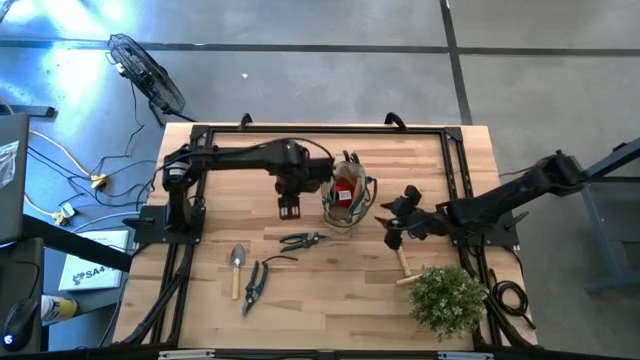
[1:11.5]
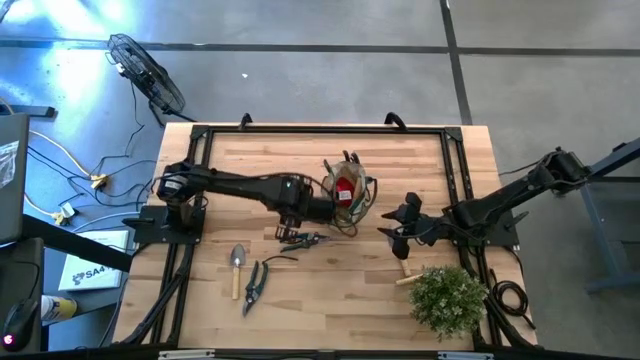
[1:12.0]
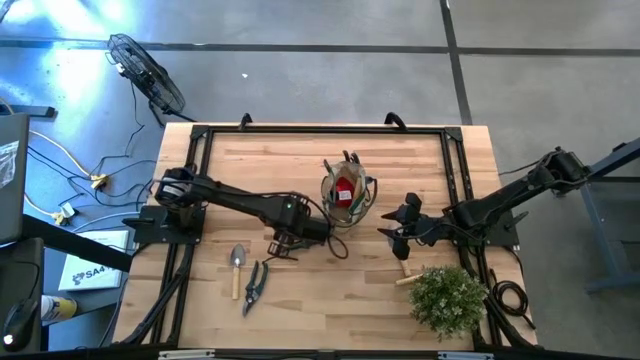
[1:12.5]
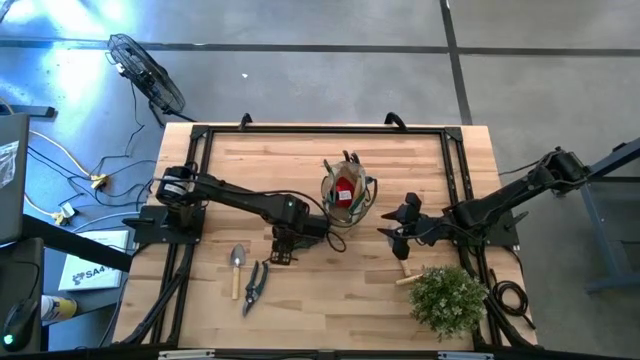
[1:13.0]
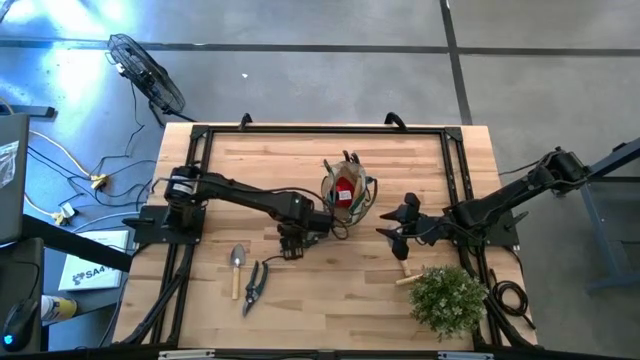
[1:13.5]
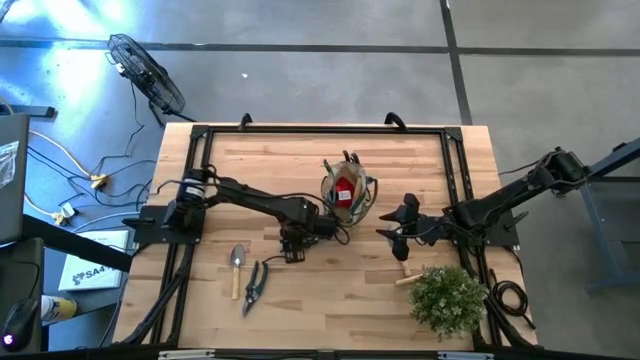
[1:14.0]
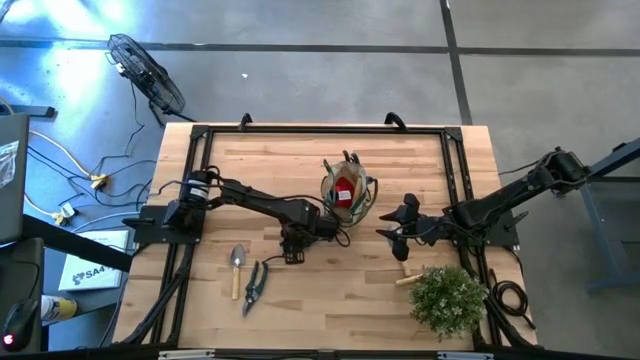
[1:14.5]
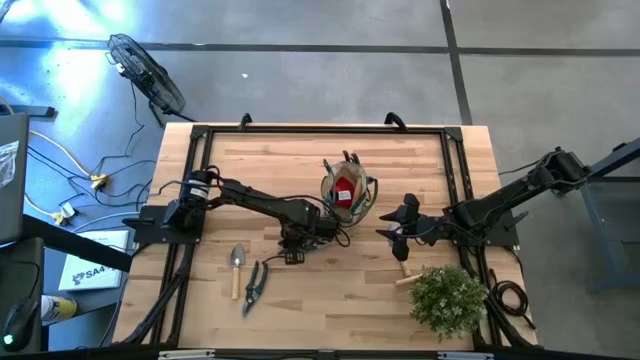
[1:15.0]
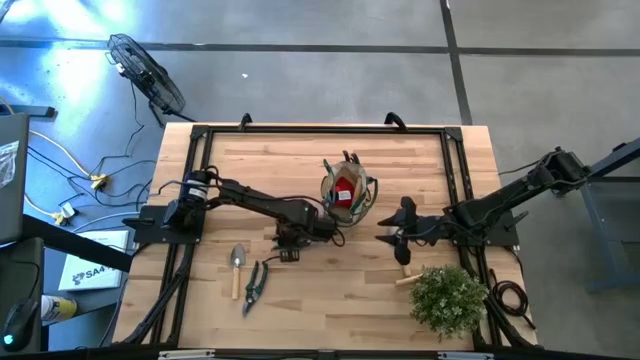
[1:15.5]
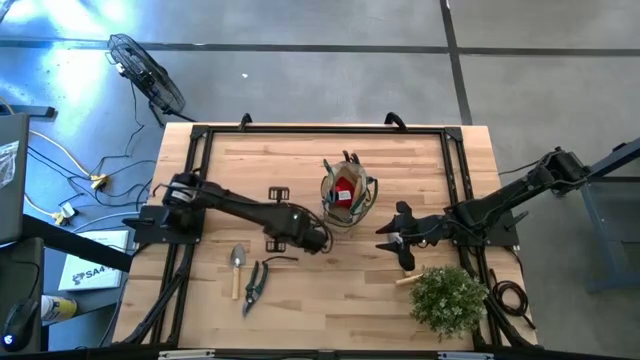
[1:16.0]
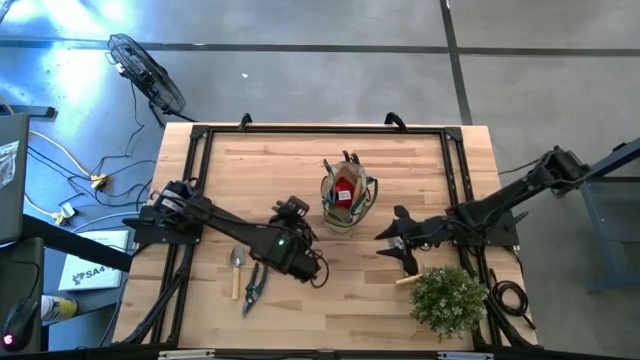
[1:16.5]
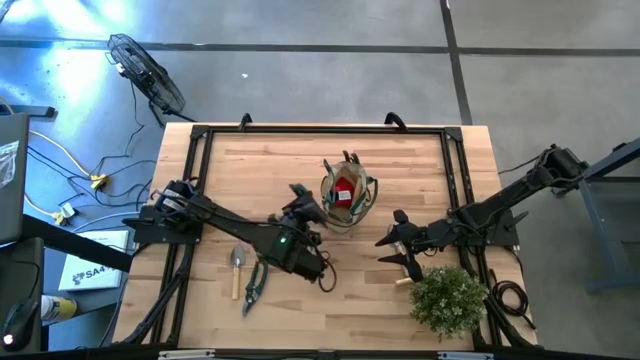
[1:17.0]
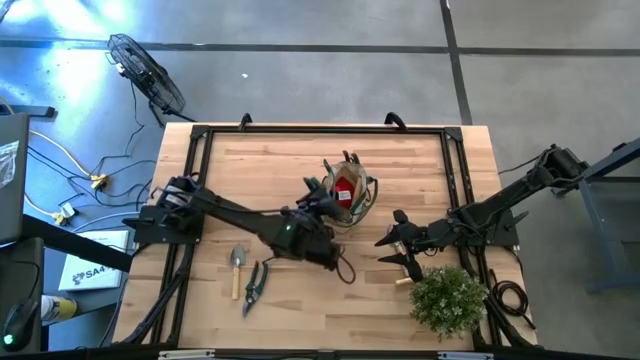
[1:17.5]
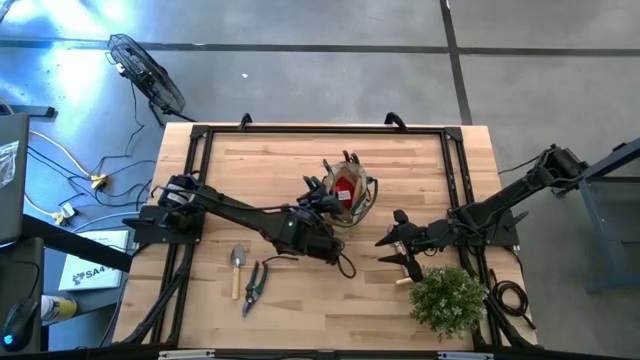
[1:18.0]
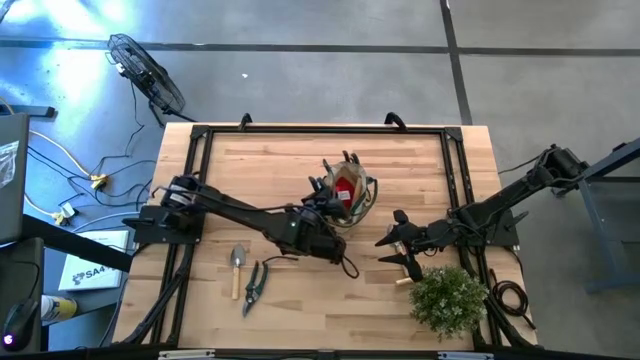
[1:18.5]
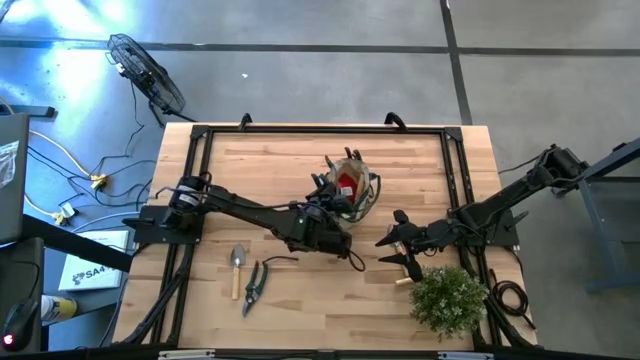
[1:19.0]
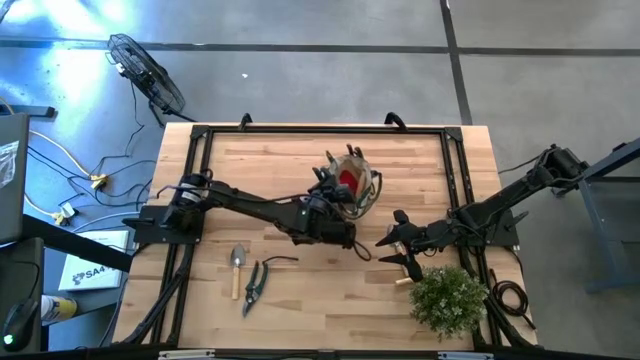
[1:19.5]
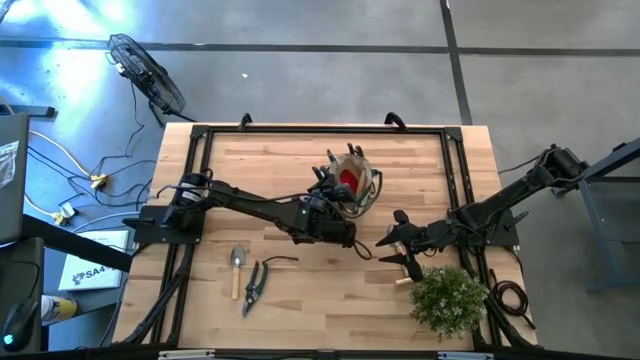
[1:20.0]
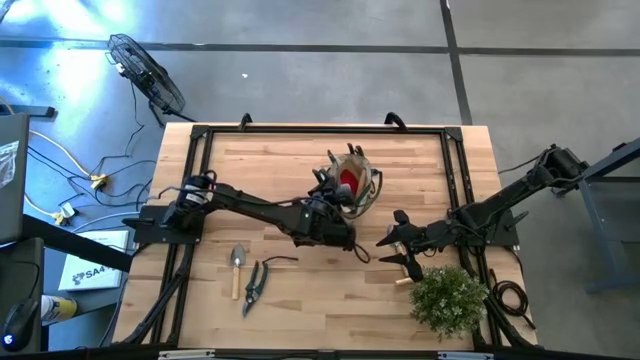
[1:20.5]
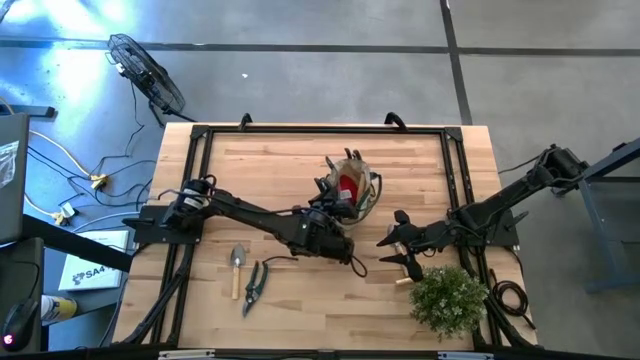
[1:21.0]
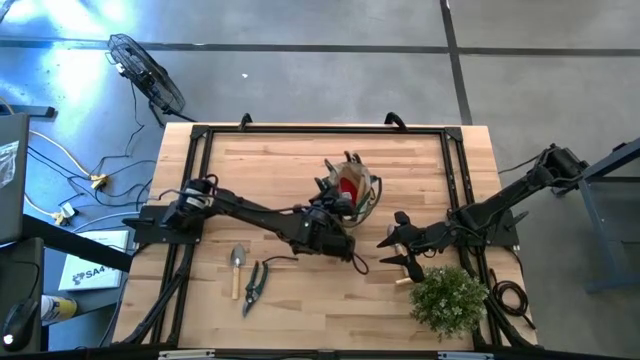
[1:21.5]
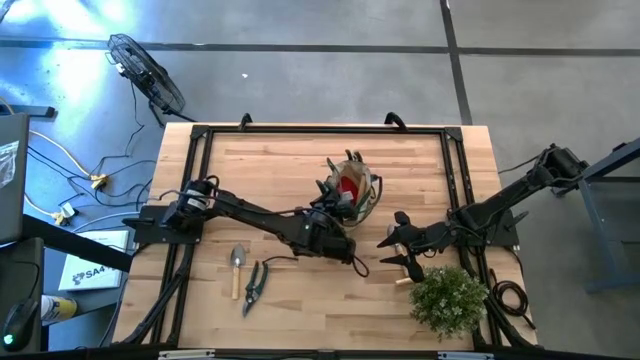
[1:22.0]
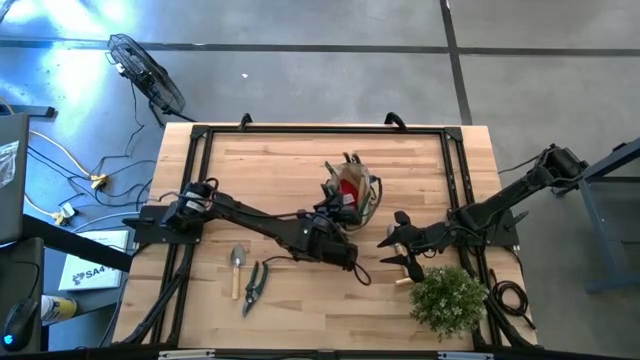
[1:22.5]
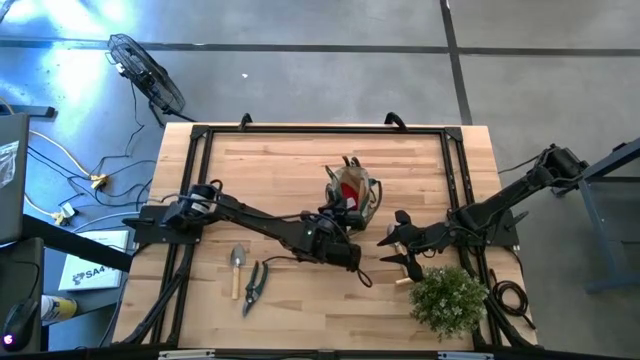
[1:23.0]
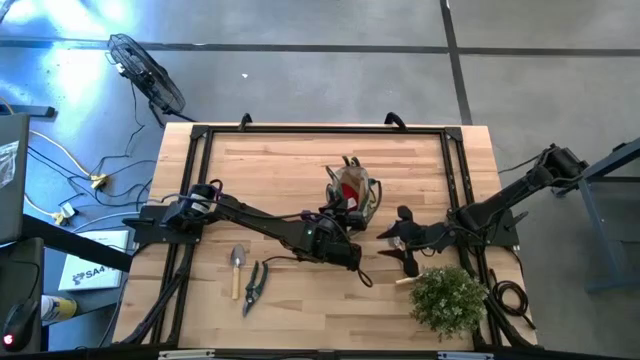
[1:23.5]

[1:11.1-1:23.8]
Task: Pick & Place Garden tools in Gardening bag
Put the top green shear scissors into the light brown gardening bag

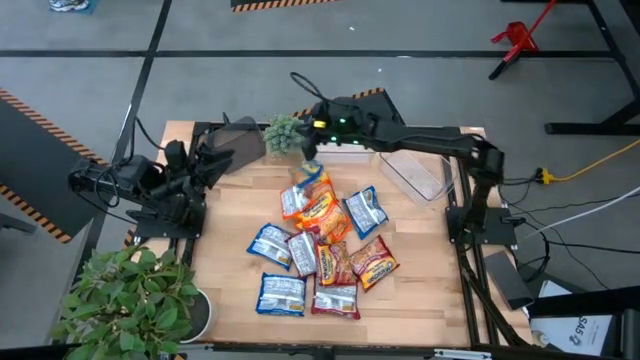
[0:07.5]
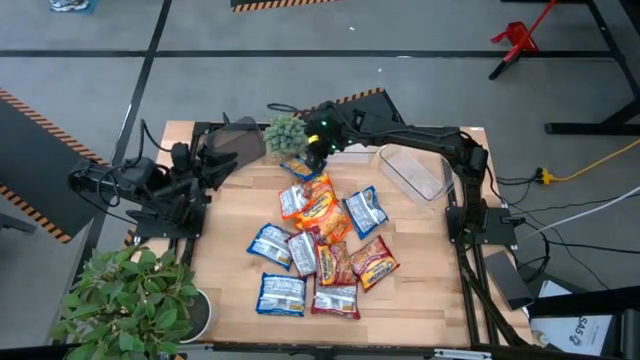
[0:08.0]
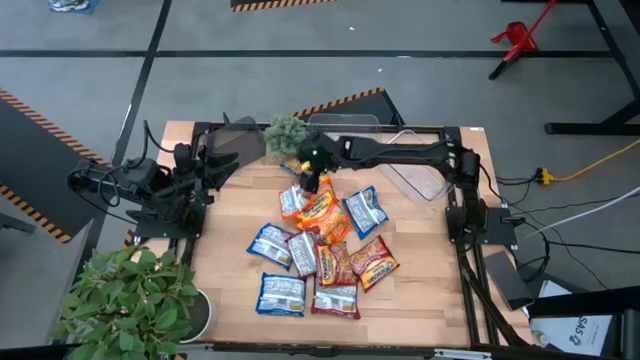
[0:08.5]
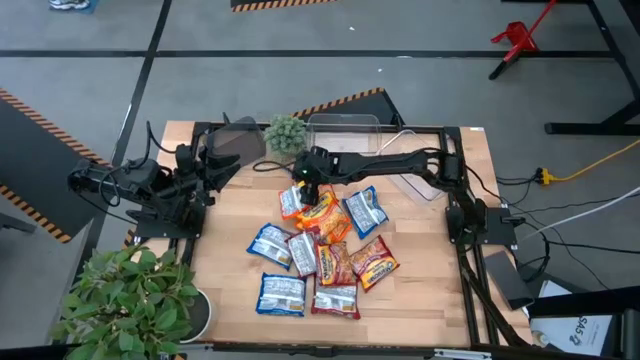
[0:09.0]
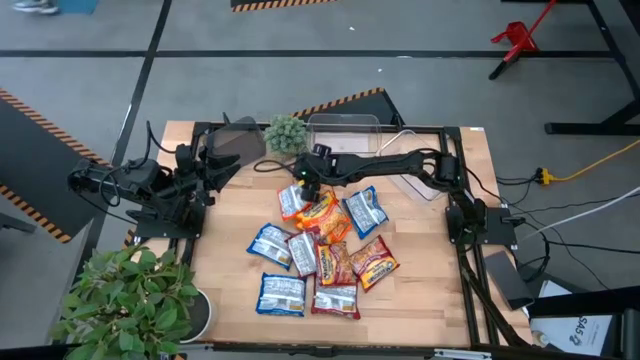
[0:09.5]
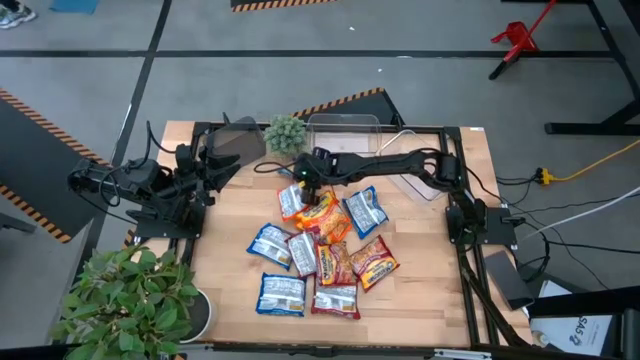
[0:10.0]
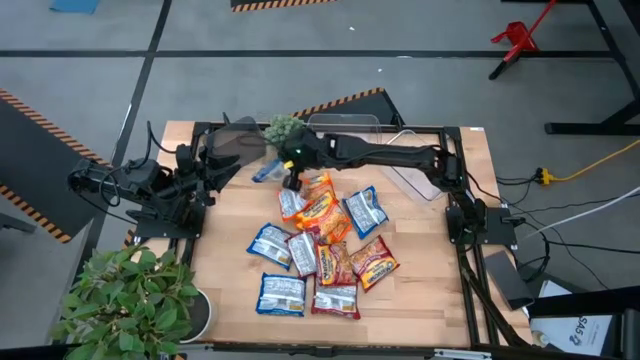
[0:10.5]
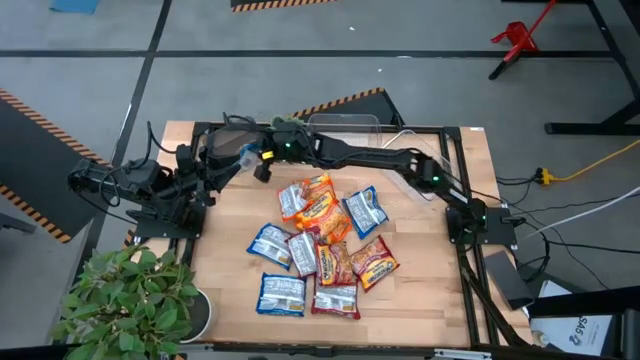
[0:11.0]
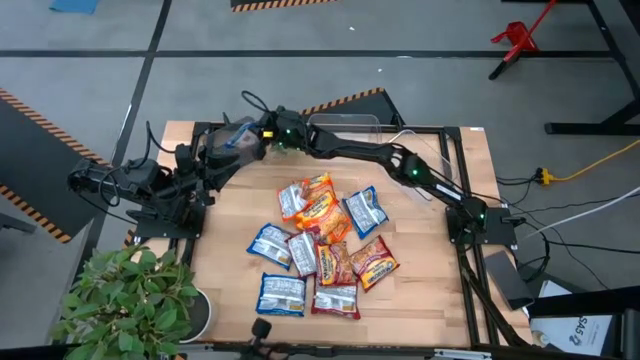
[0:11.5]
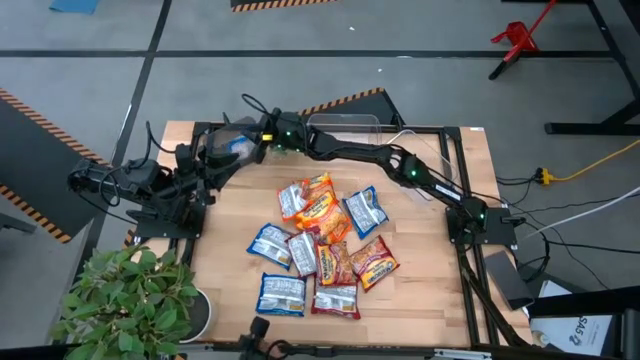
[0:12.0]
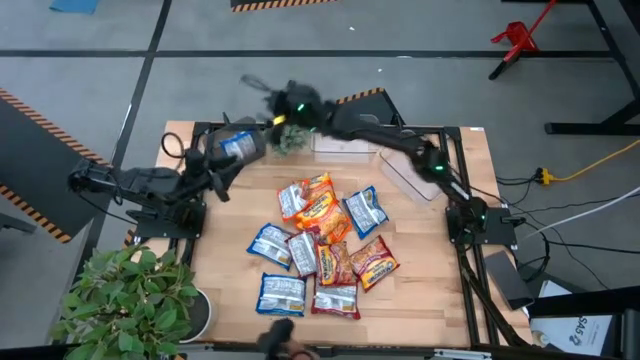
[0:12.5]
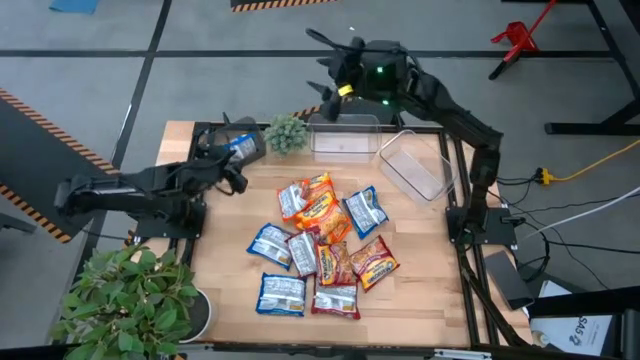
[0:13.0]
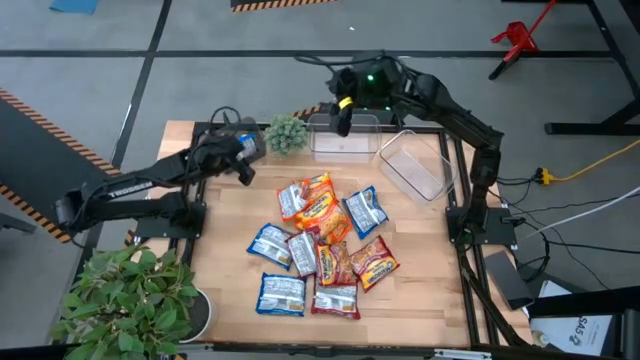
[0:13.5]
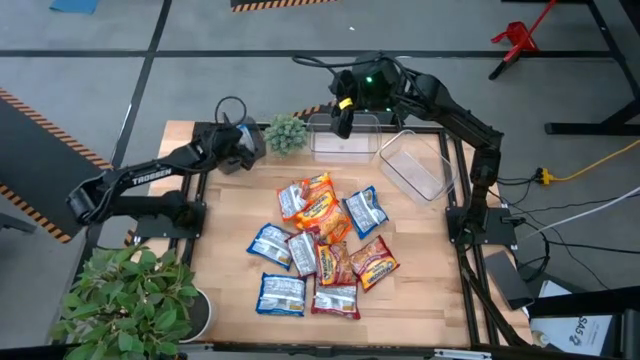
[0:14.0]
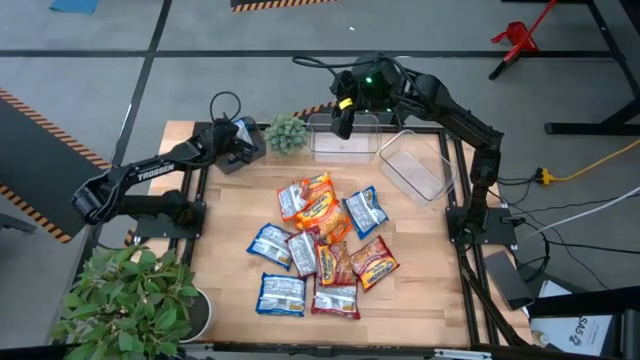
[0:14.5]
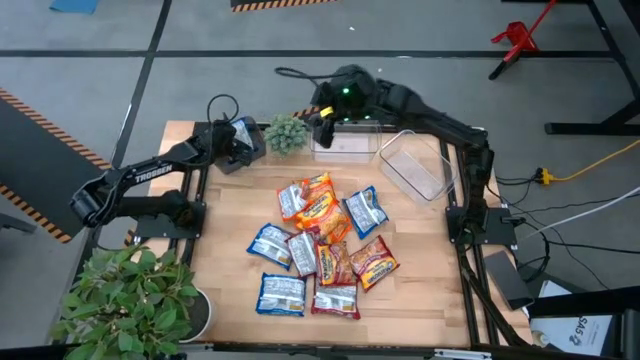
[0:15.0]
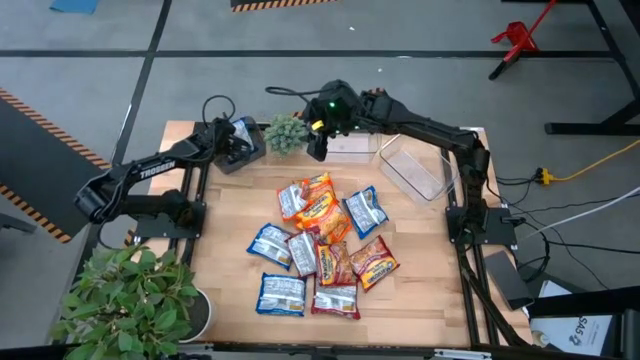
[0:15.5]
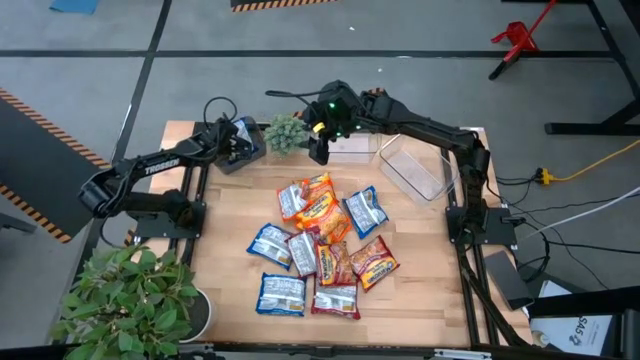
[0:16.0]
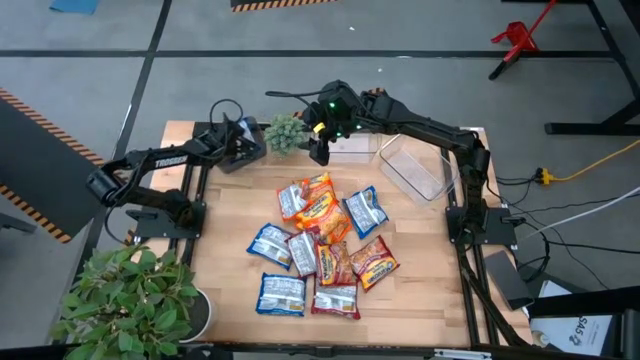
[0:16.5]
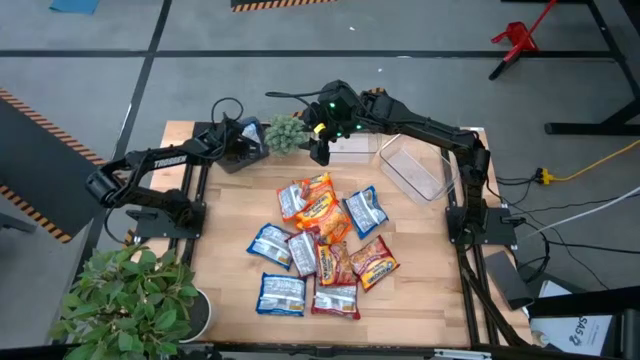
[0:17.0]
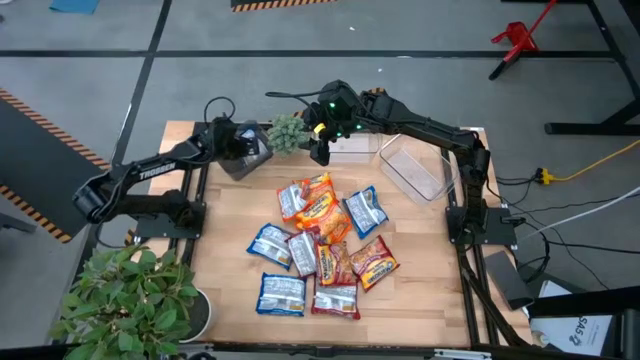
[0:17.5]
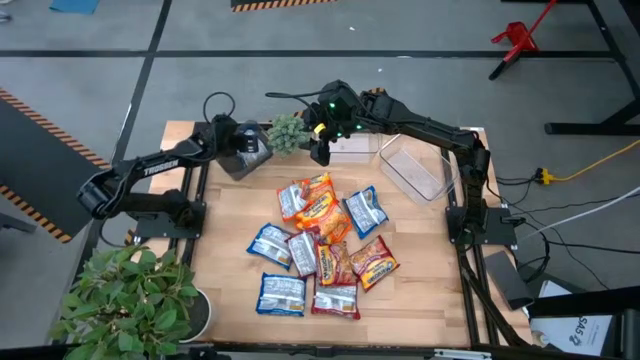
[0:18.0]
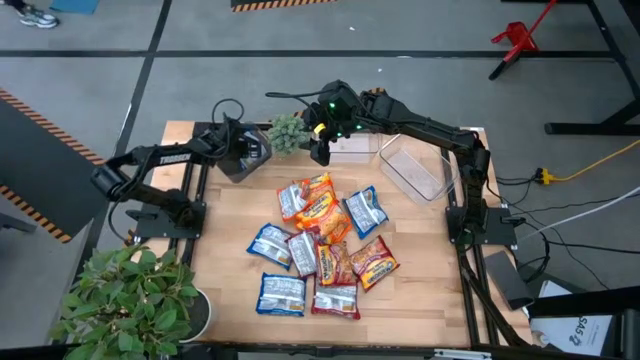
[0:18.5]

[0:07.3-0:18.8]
Task: Sort Maruchan noodles
Put the blue noodle pack into the black bin
